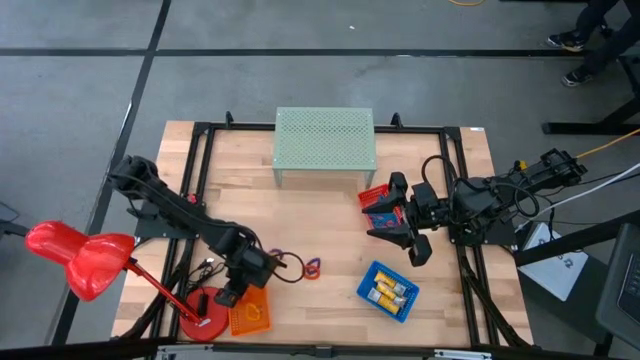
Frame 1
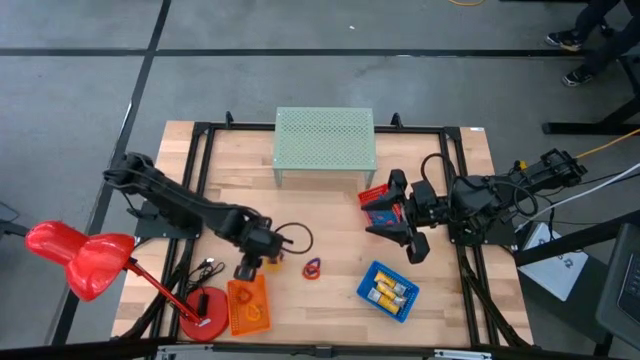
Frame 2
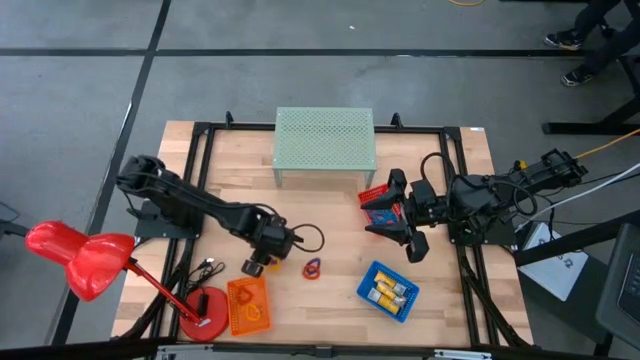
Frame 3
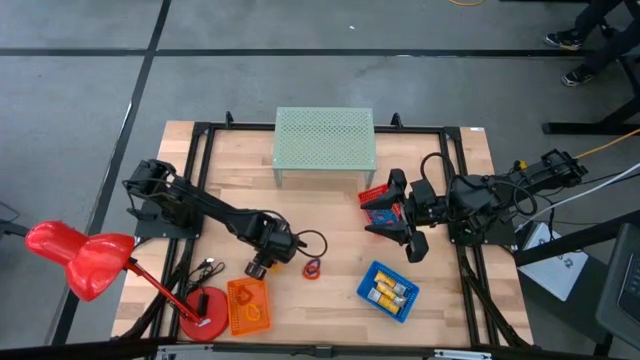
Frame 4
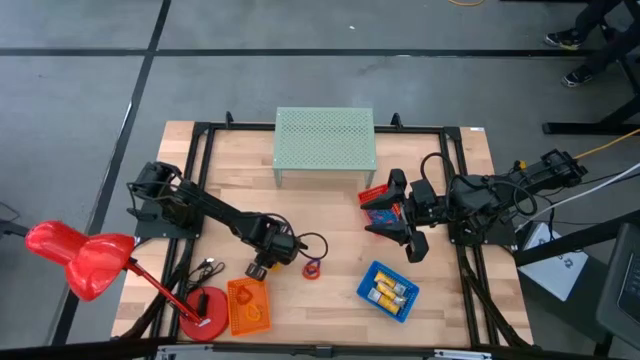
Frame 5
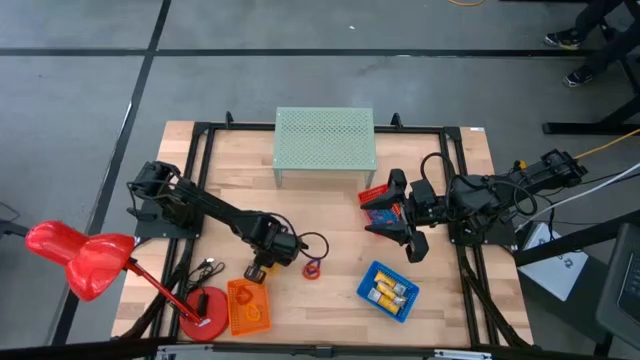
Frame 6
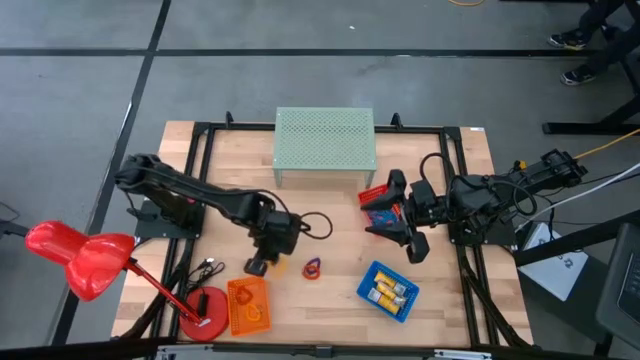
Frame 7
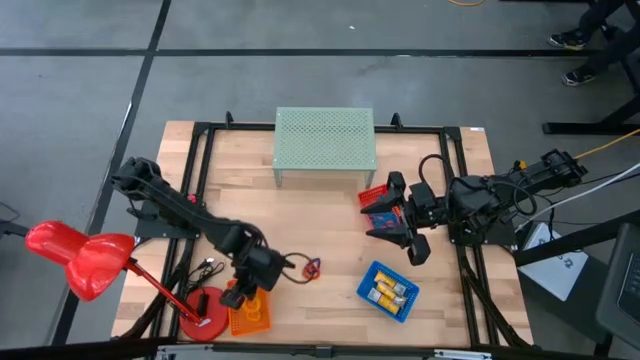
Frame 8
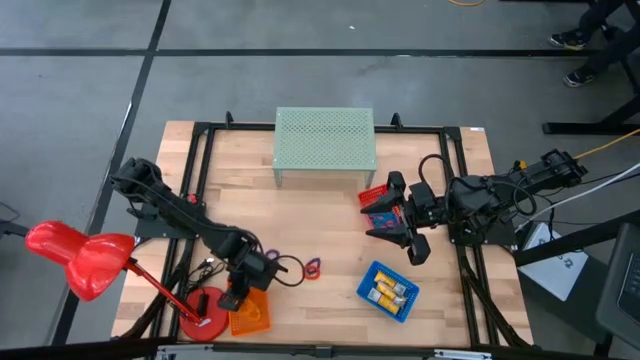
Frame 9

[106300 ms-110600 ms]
Task: Pick & Place Office Desk Supplies
Put the yellow spring rubber band into the orange basket

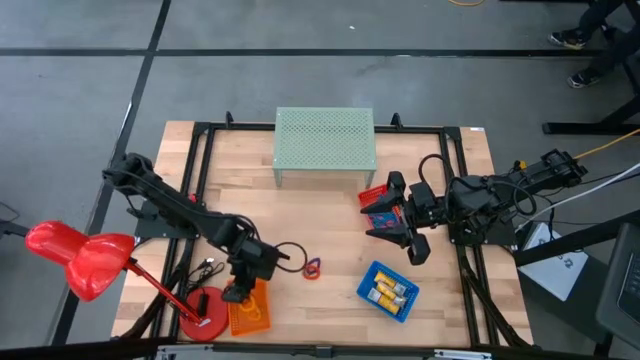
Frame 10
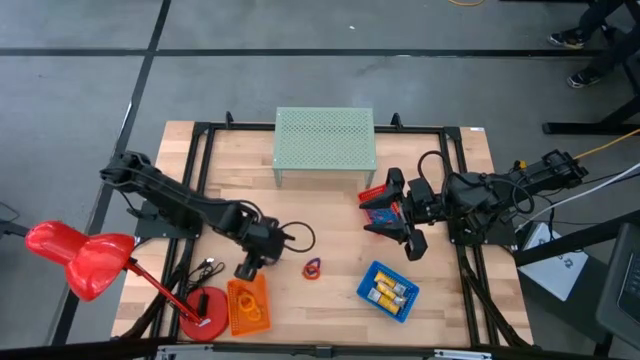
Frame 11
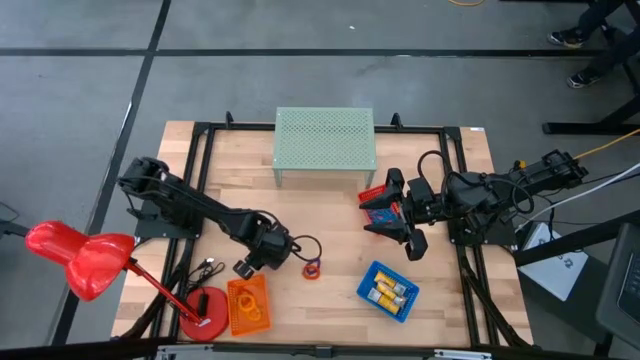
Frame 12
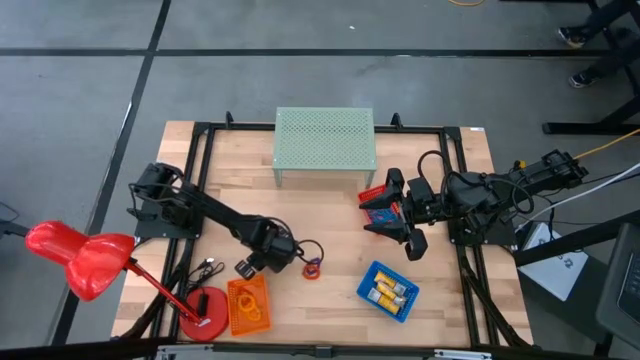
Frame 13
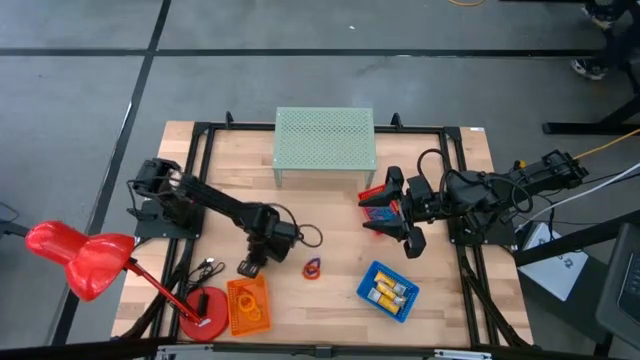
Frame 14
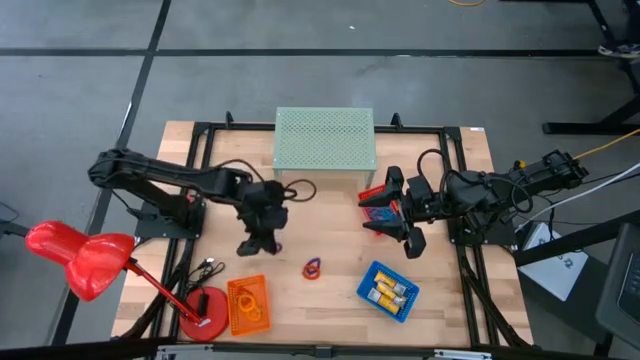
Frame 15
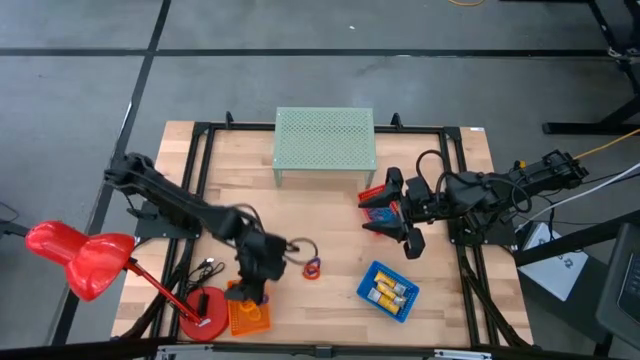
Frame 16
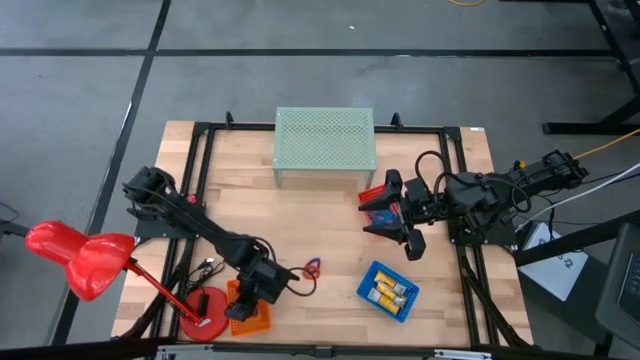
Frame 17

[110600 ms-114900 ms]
Put the purple spring rubber band into the orange basket

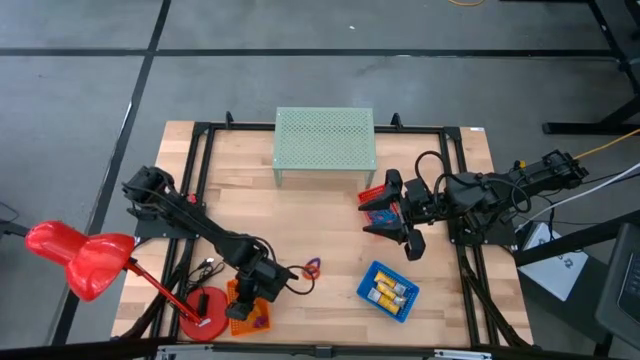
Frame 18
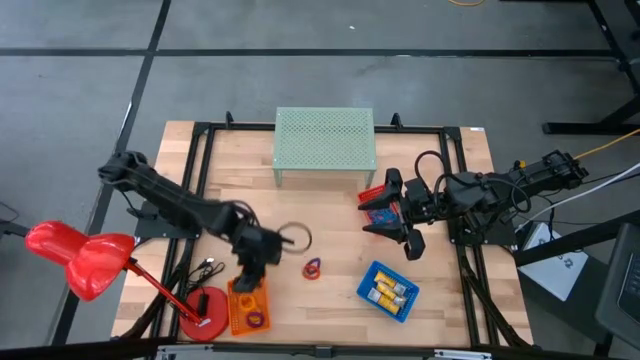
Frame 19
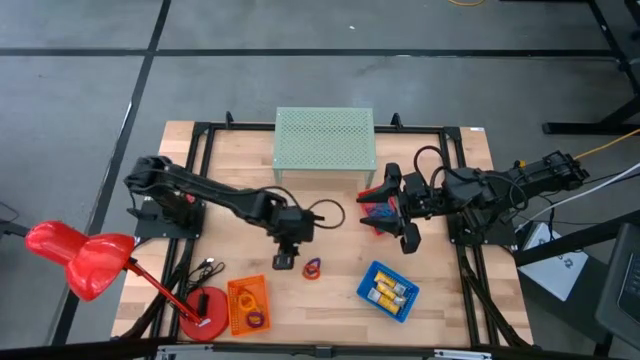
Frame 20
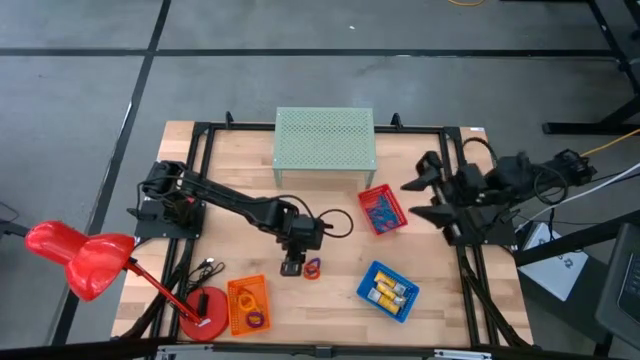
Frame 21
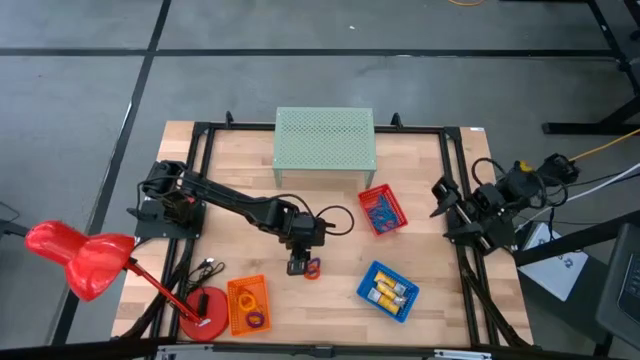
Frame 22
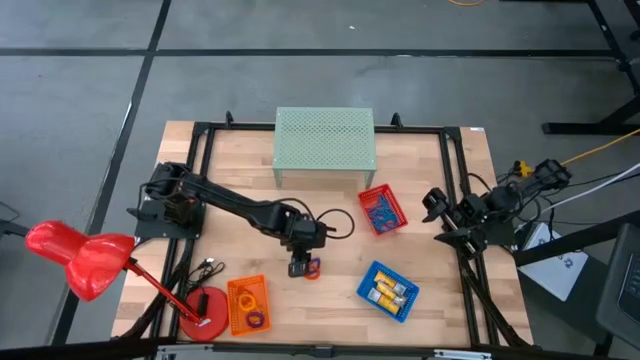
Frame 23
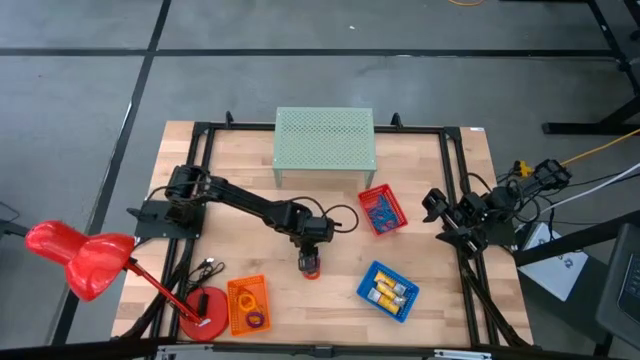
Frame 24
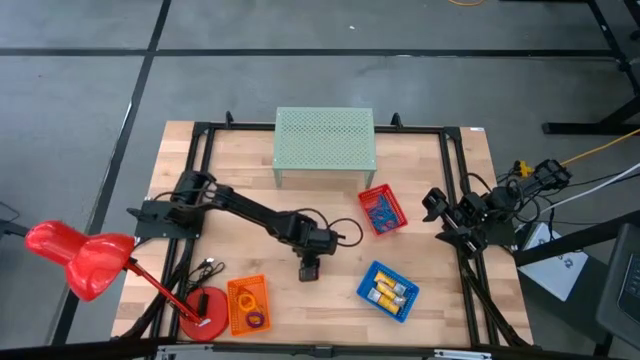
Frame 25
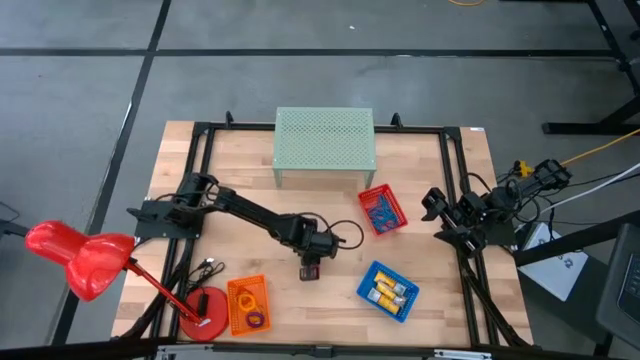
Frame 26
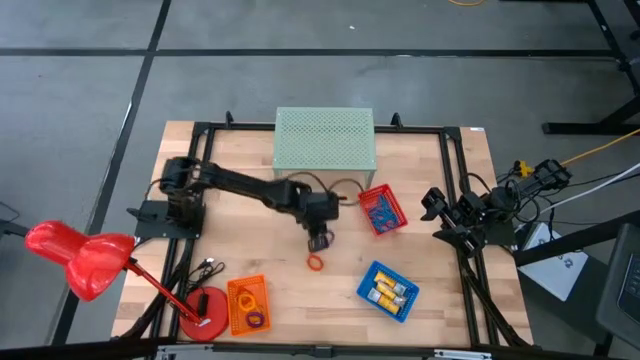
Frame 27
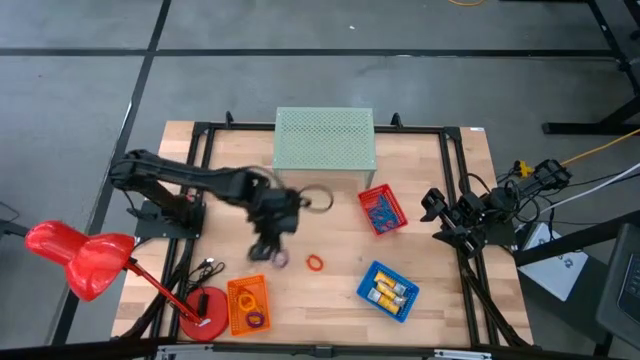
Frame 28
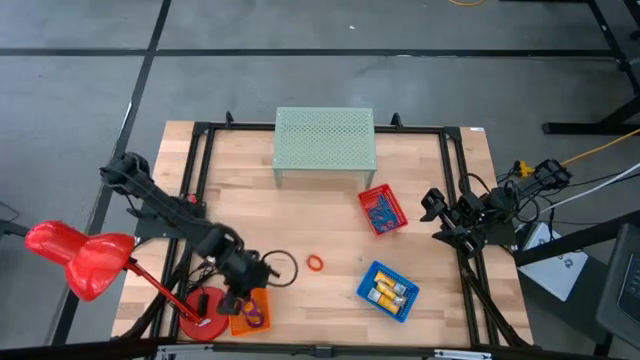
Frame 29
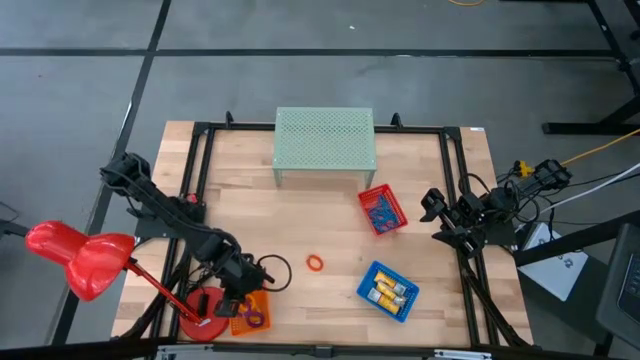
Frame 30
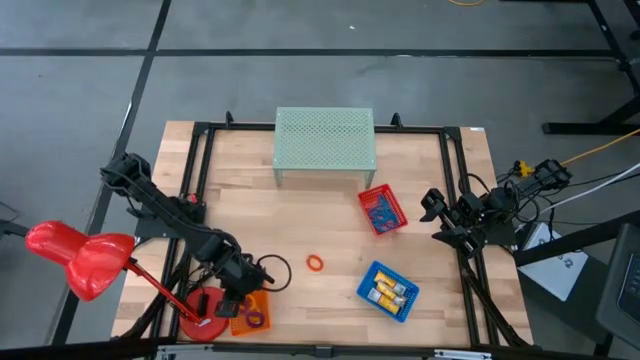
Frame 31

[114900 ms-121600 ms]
Put the purple spring rubber band into the orange basket

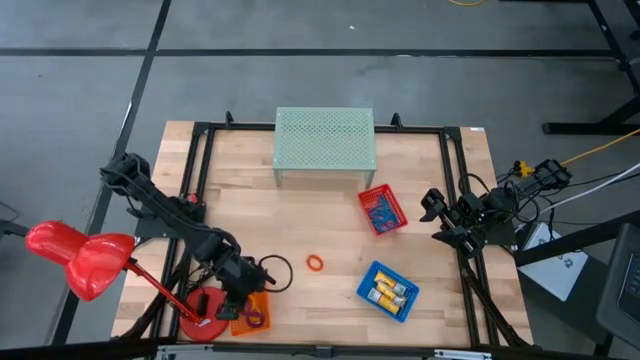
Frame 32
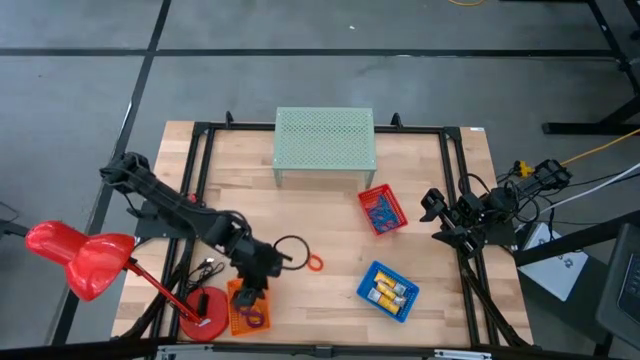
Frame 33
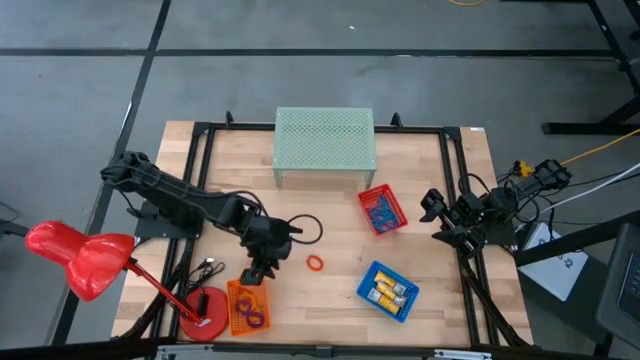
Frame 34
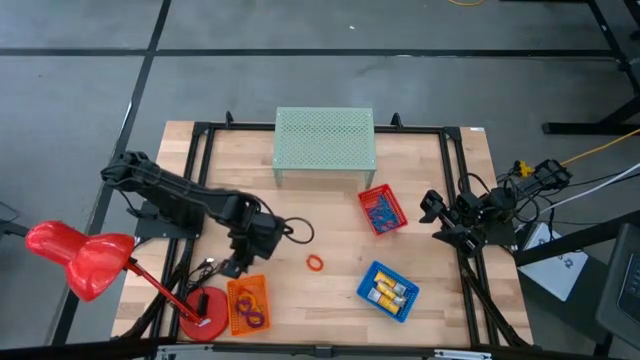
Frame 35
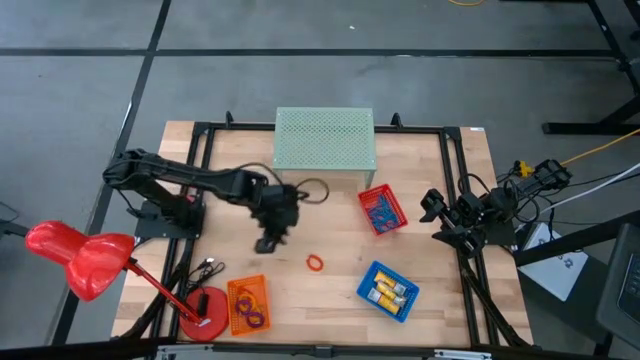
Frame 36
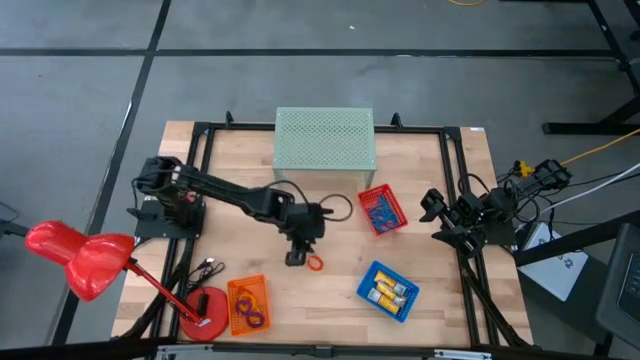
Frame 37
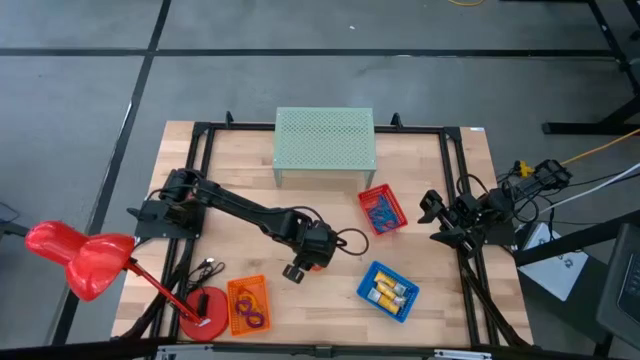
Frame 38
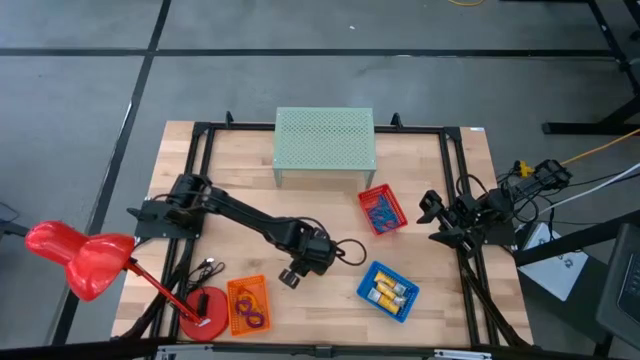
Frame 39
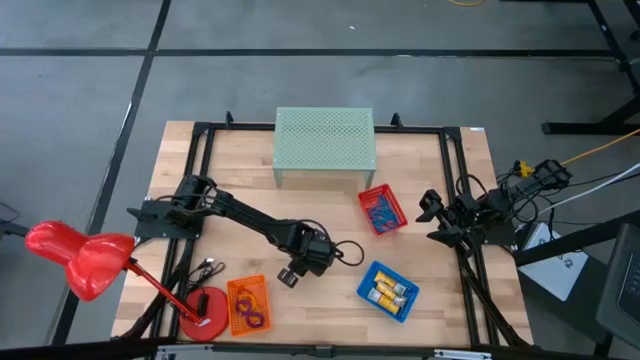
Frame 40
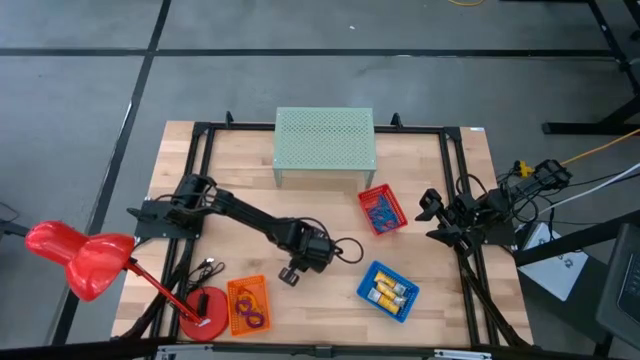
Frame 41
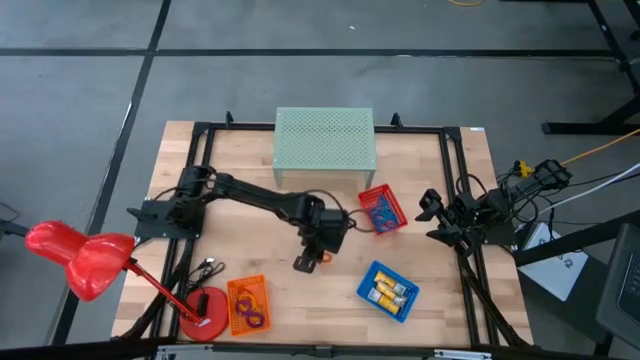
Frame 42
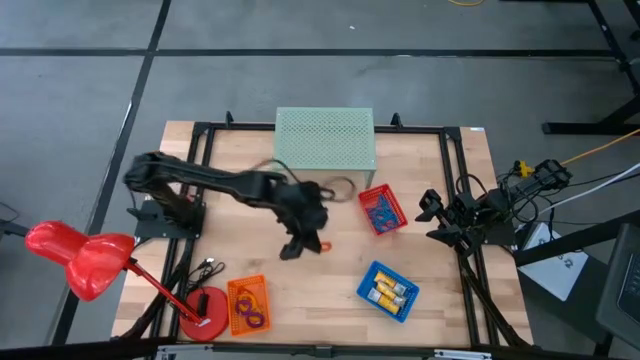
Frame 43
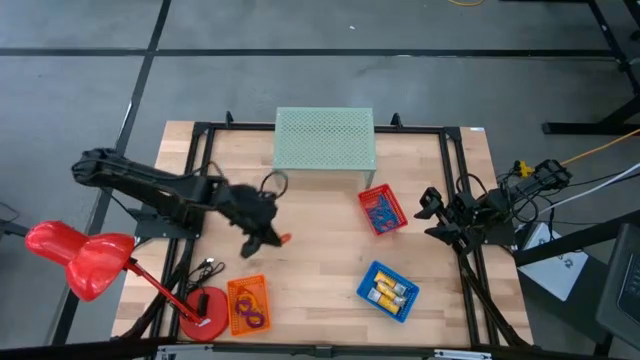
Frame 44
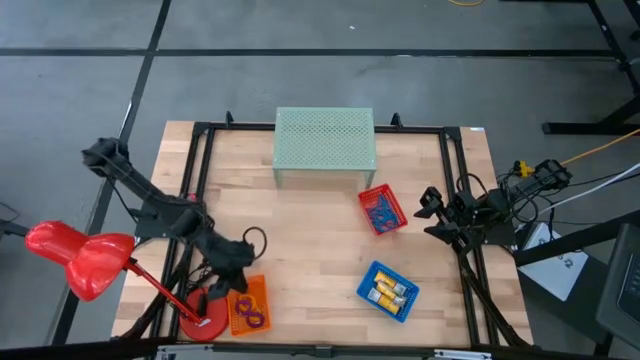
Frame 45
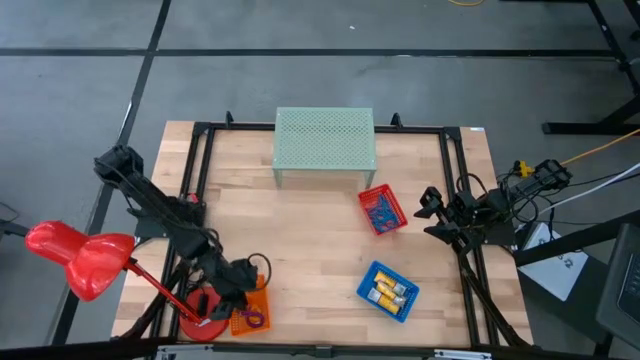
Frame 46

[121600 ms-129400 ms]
Put the orange spring rubber band into the orange basket
